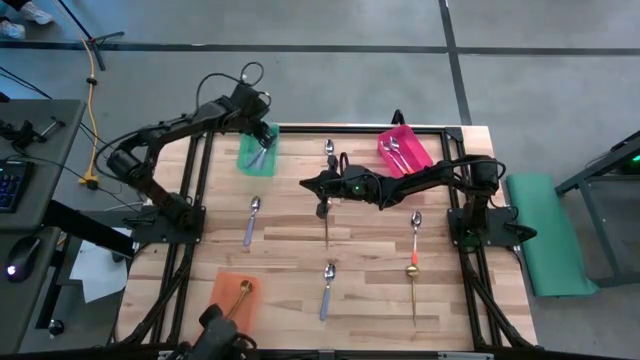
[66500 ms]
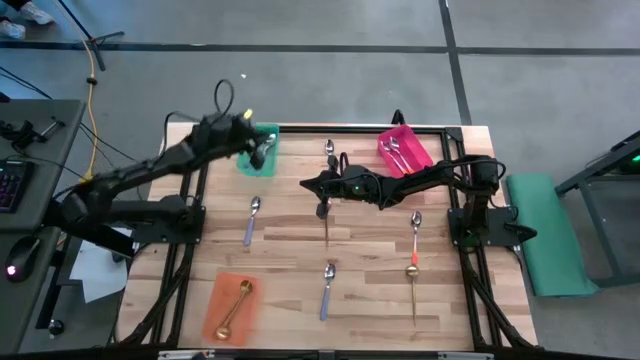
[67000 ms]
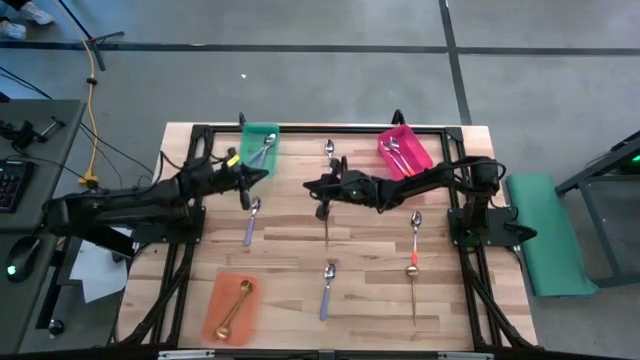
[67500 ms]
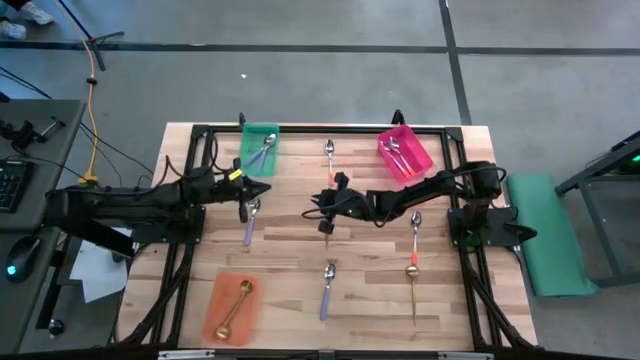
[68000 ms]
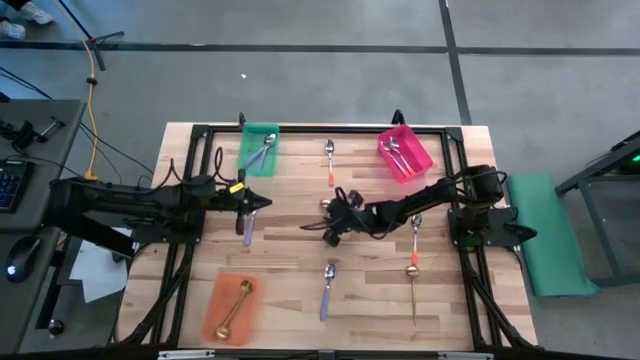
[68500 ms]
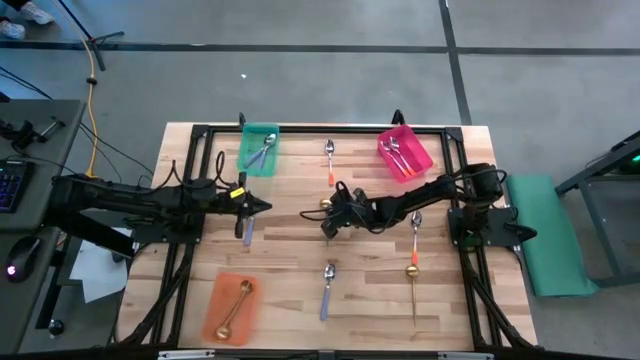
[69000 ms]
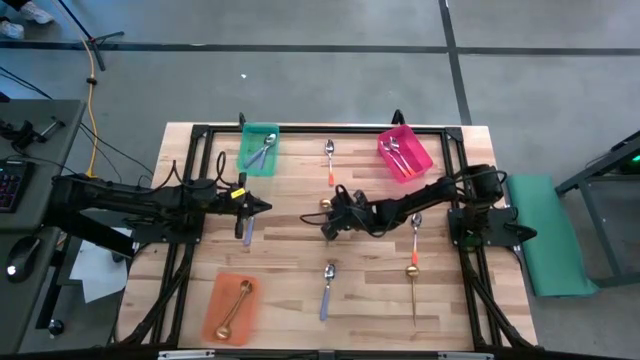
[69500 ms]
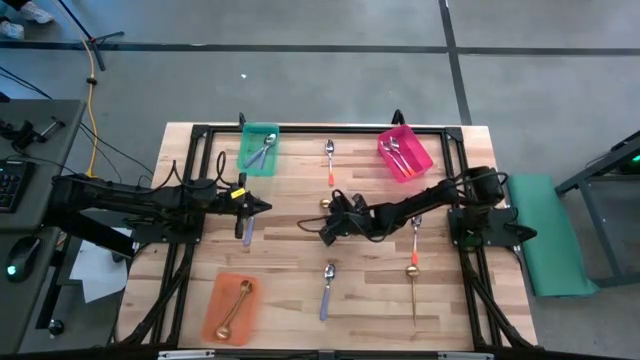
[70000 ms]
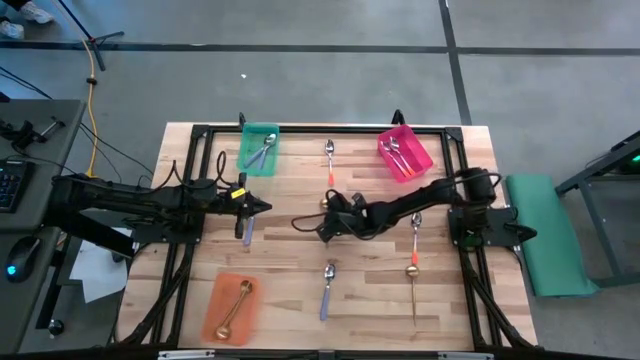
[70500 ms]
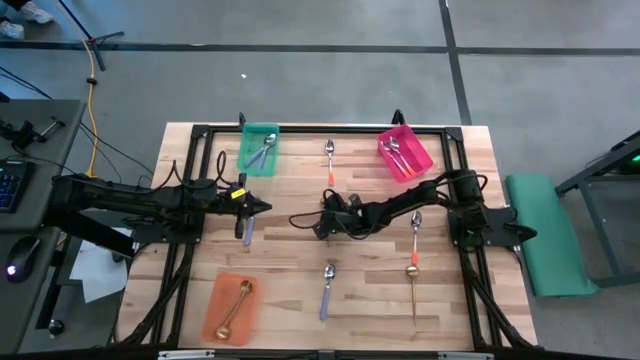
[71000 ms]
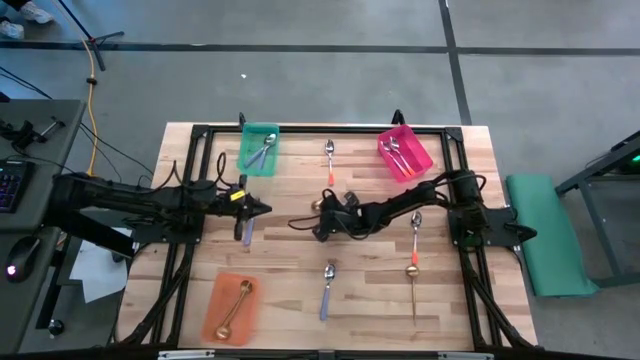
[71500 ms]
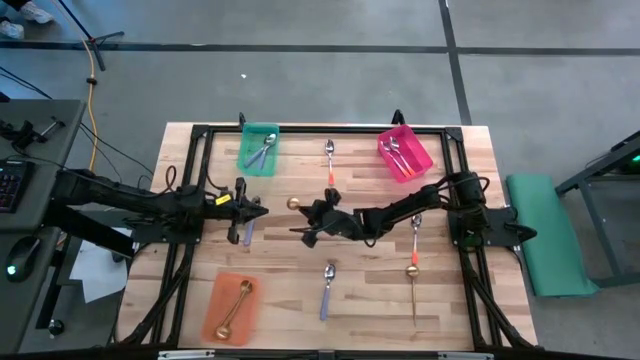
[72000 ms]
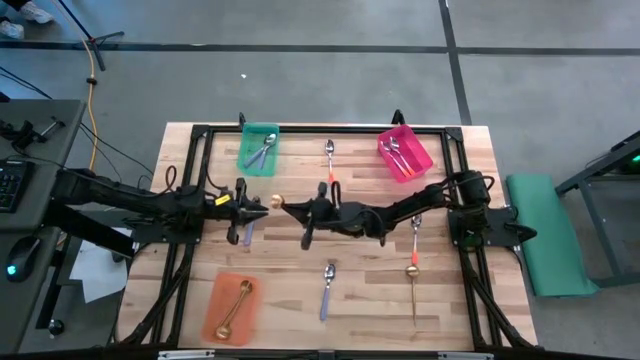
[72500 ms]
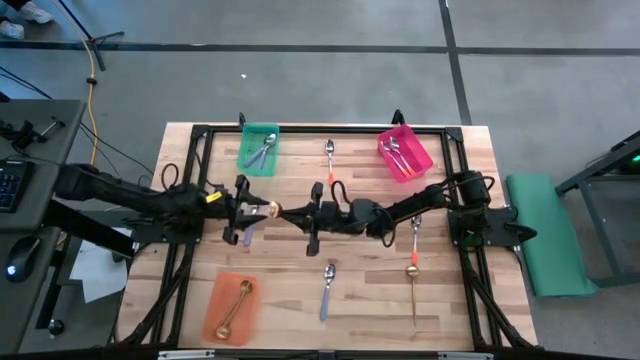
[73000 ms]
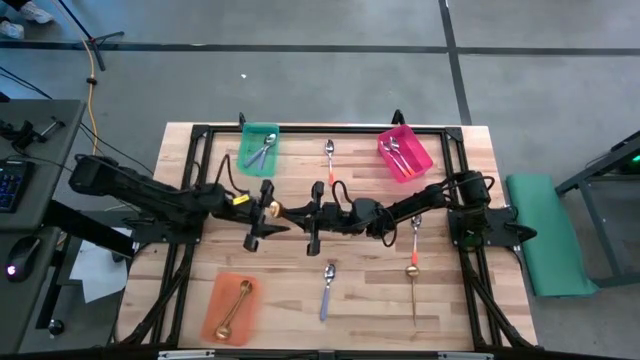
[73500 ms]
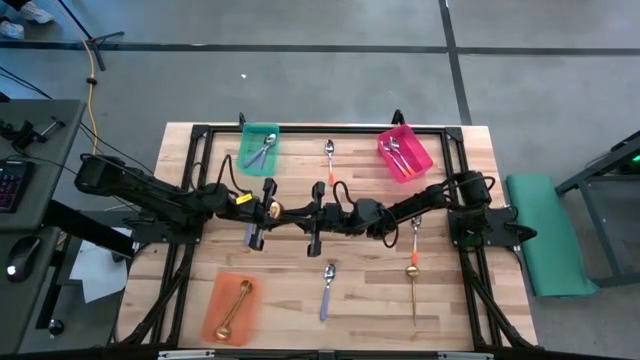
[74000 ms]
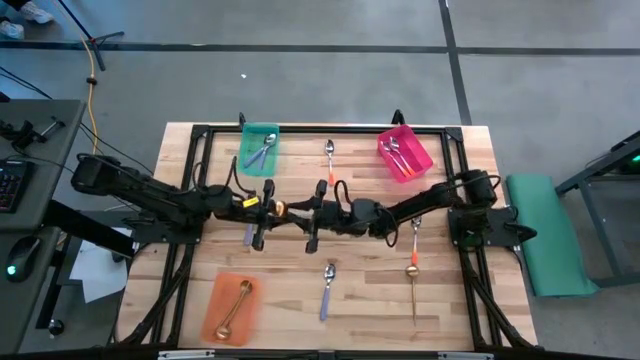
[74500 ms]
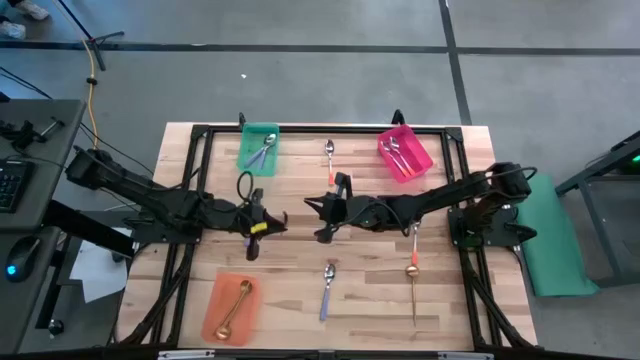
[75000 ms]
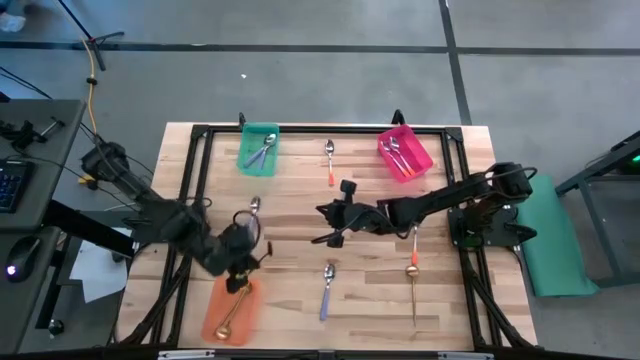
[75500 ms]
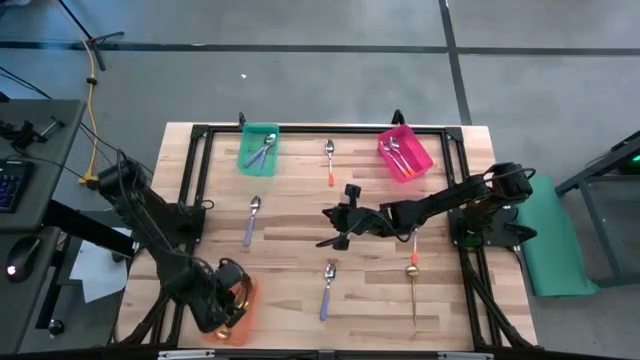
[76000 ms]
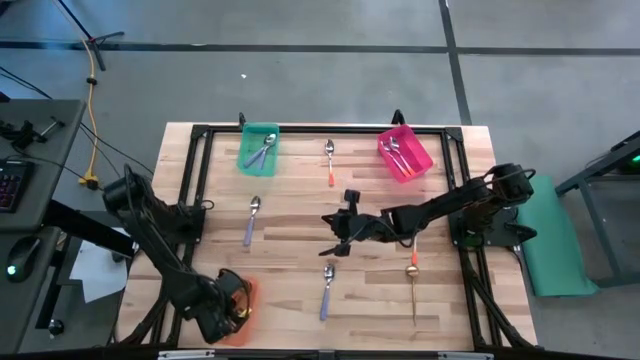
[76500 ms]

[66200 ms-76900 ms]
Task: Sort silverware by color (type)
Put the gold spoon into the orange bin

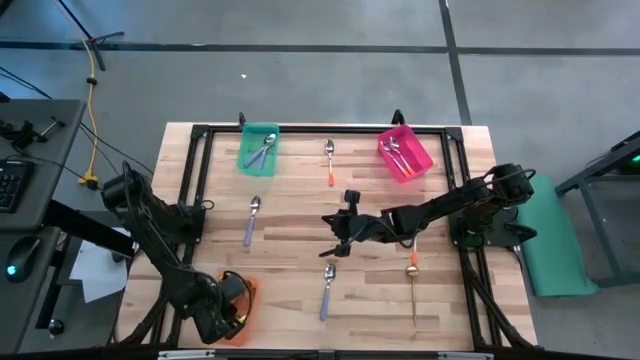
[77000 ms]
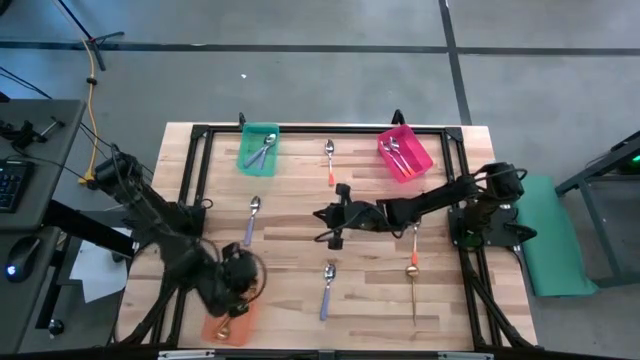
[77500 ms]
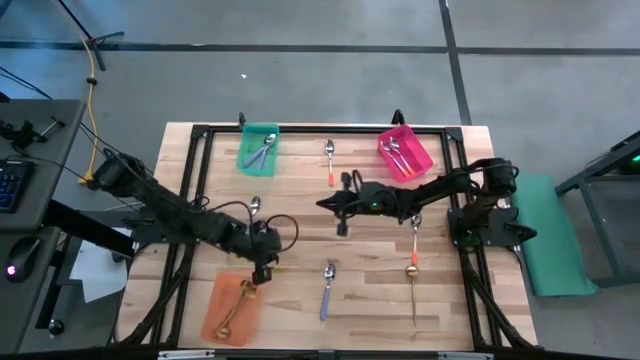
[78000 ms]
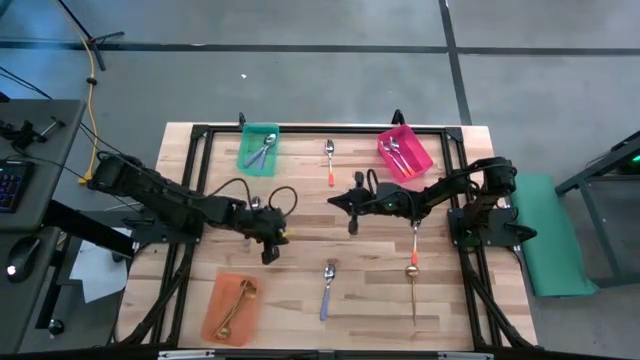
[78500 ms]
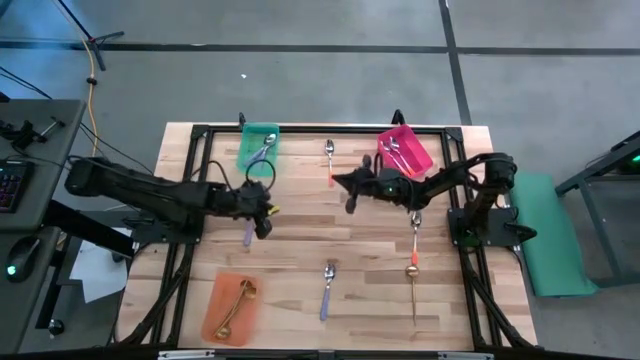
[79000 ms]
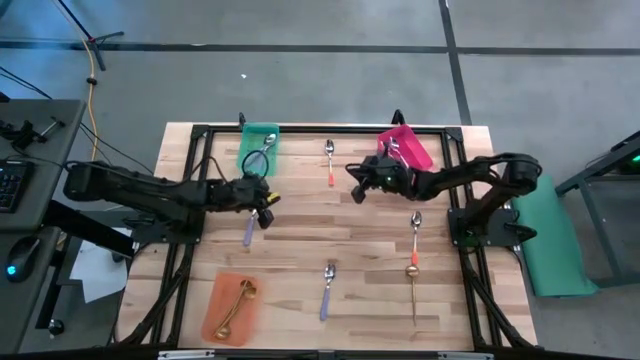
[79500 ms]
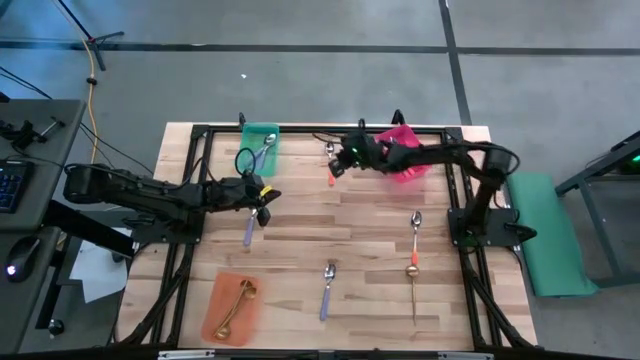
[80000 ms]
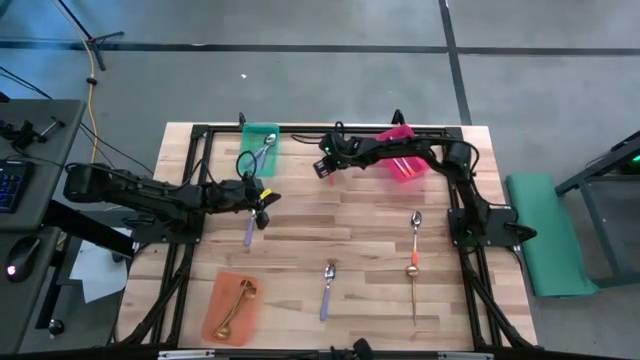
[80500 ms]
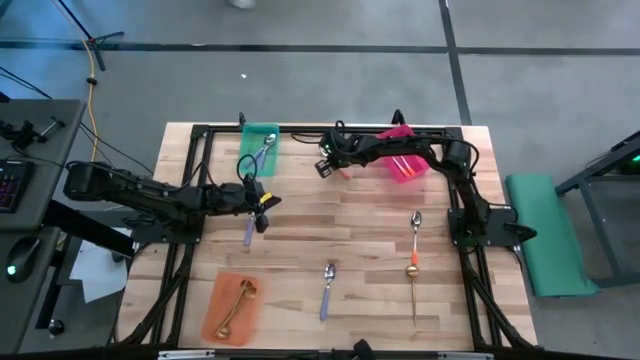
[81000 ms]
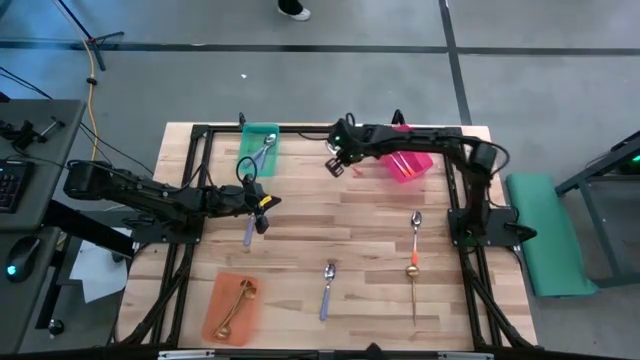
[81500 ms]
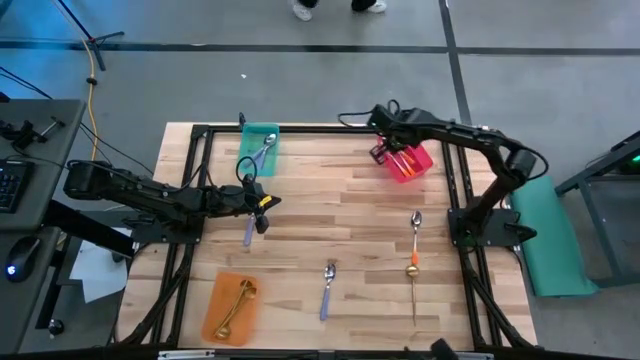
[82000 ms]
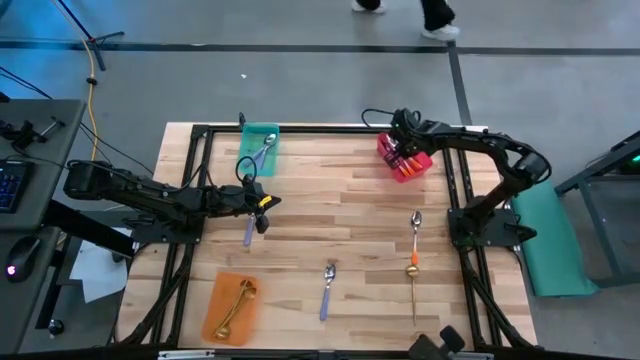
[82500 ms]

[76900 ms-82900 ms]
Put the orange spoon into the pink bin

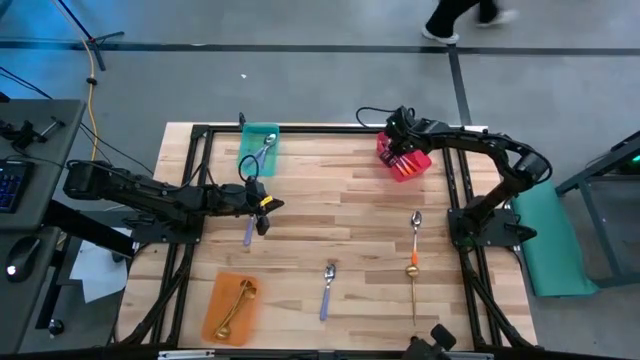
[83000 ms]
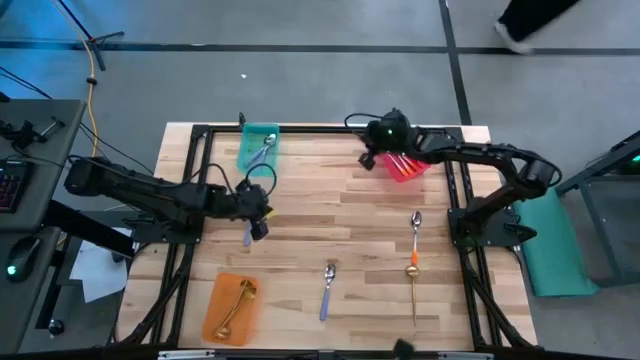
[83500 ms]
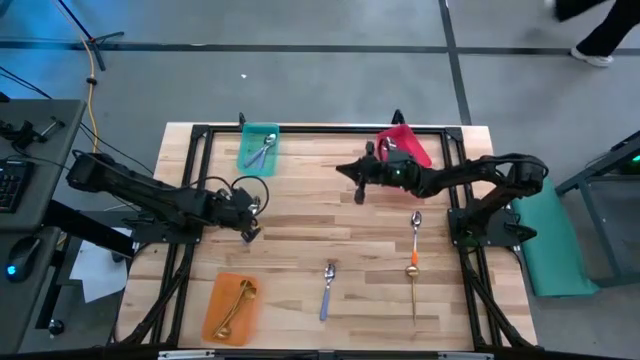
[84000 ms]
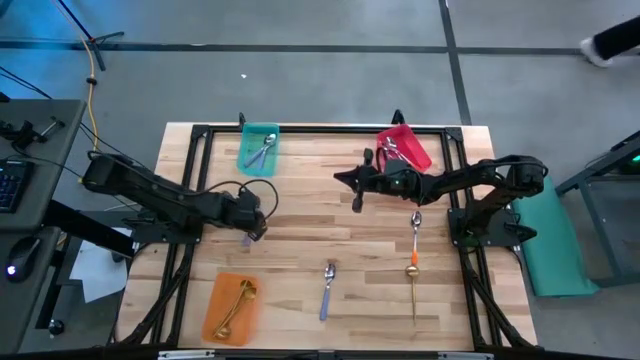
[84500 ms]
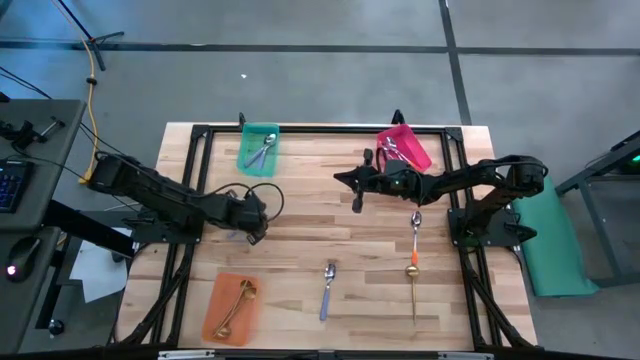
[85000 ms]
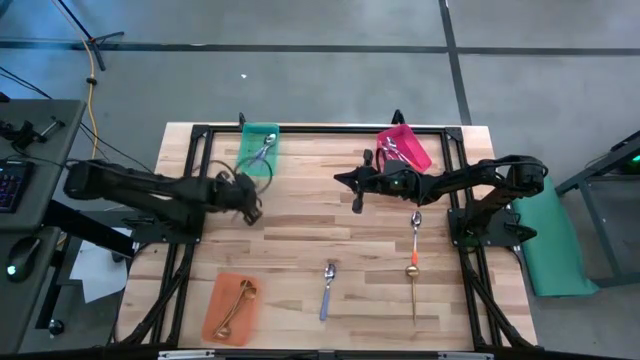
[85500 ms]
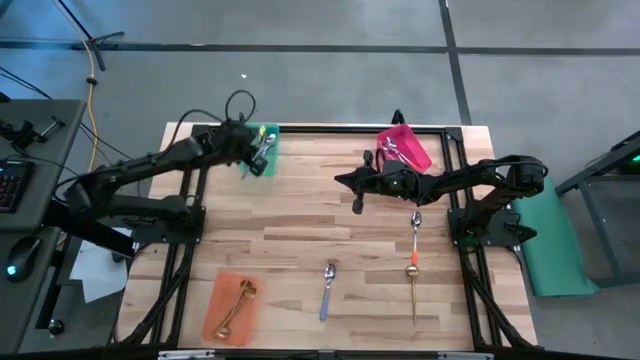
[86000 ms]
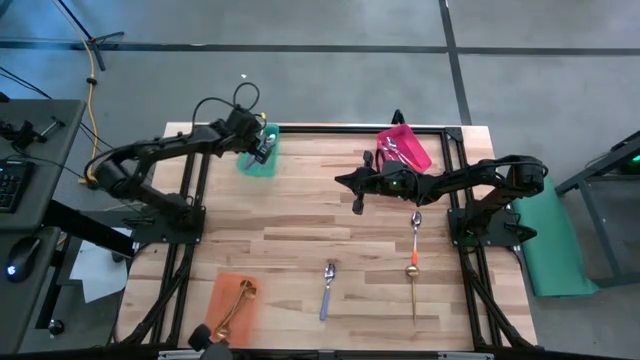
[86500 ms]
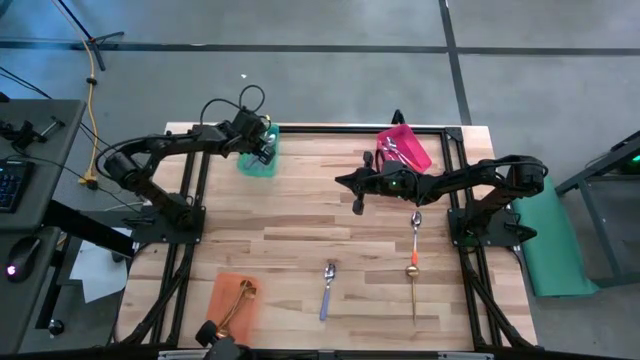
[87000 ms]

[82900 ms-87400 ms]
Put the purple spoon into the blue bin

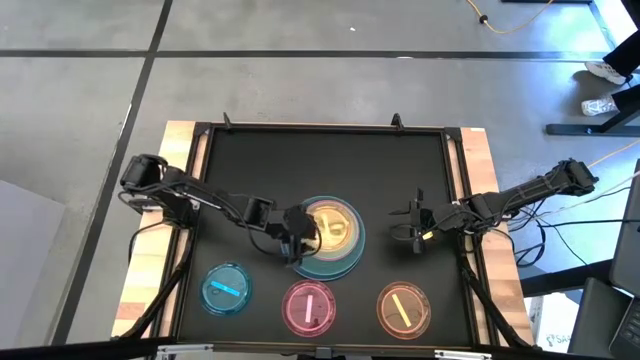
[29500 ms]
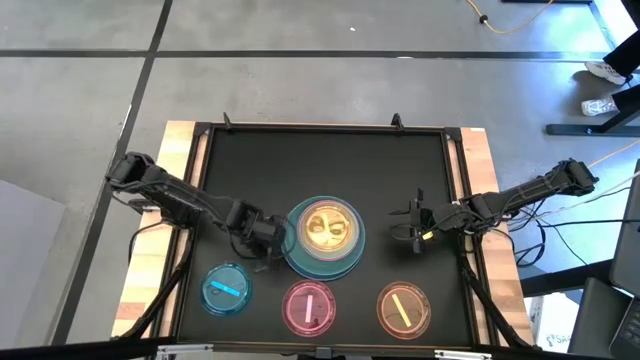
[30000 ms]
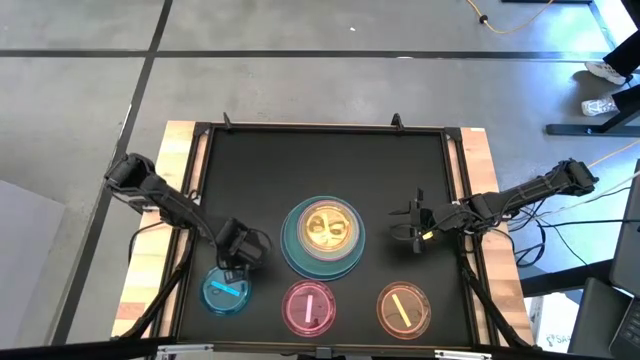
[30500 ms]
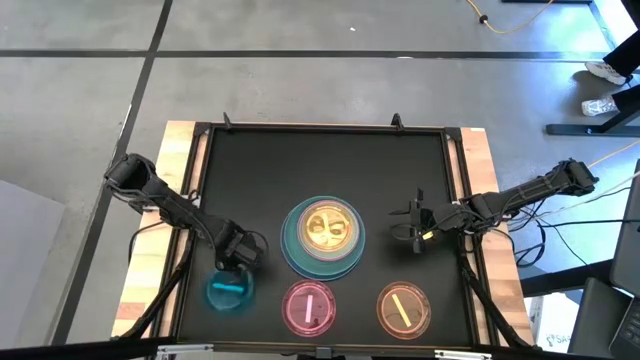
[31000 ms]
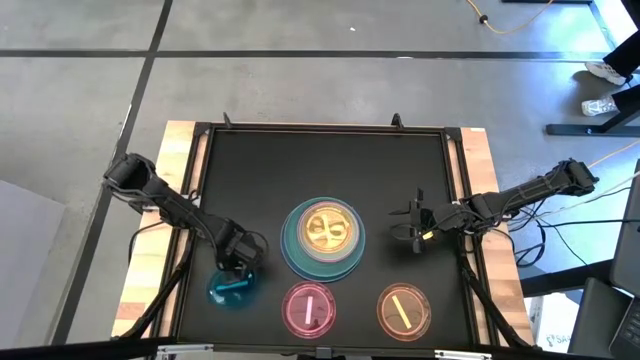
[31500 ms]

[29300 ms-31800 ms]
Task: Stack plastic plates
Stack the small dark blue plate on the small orange plate
